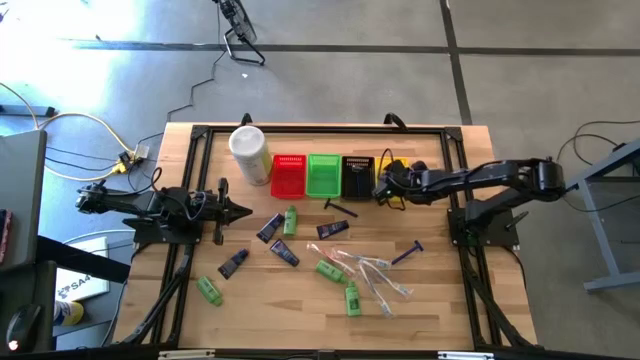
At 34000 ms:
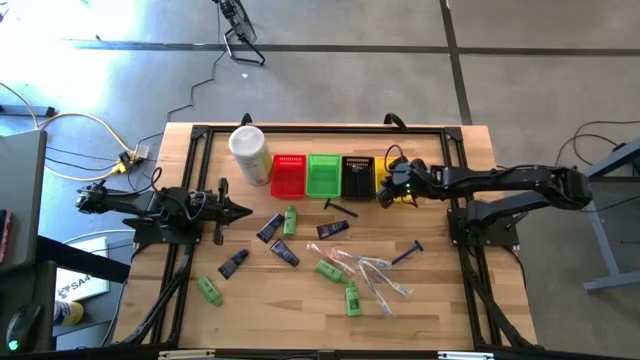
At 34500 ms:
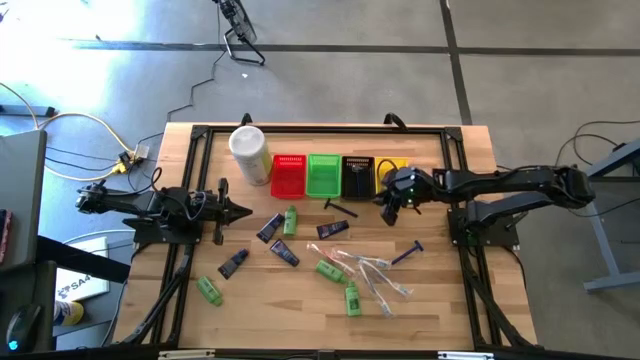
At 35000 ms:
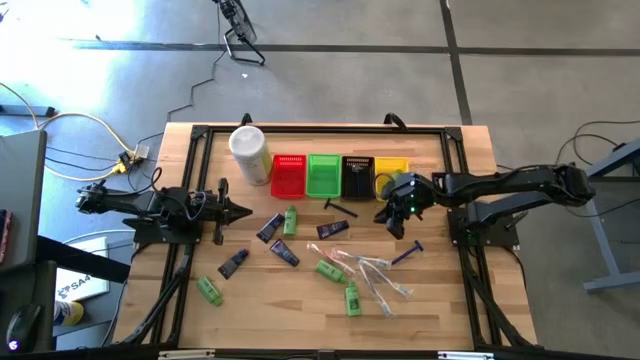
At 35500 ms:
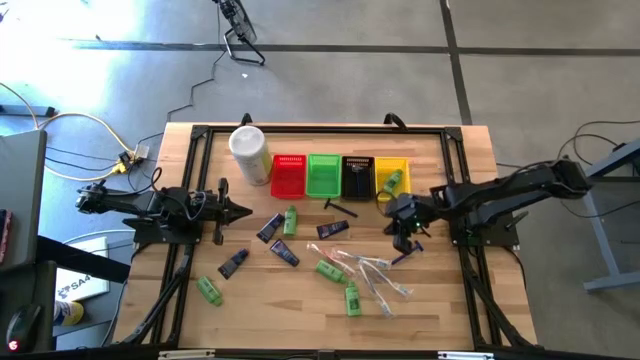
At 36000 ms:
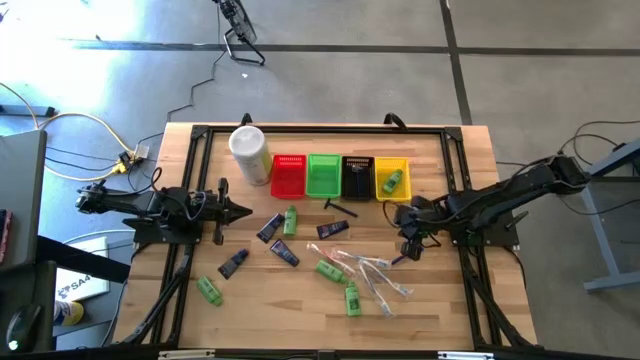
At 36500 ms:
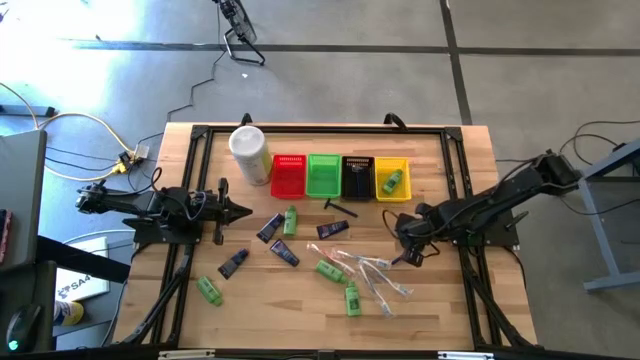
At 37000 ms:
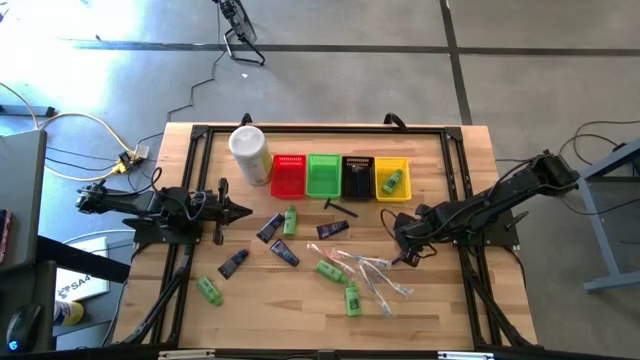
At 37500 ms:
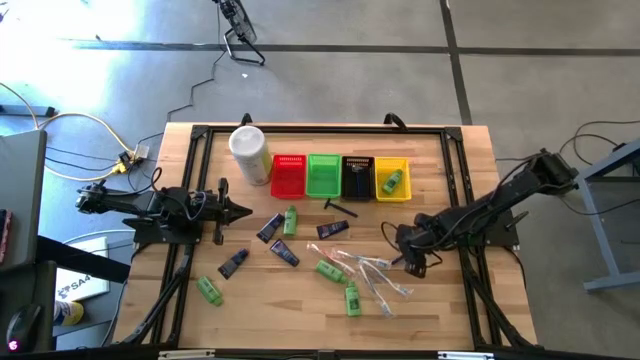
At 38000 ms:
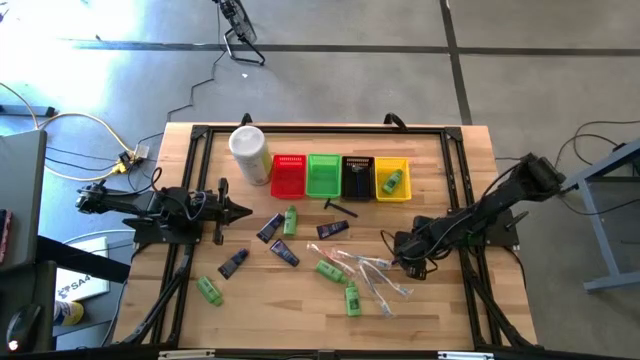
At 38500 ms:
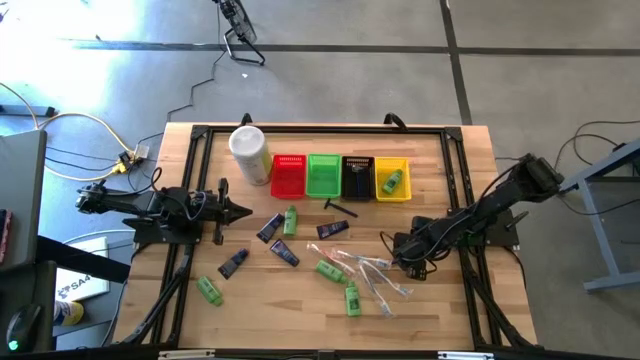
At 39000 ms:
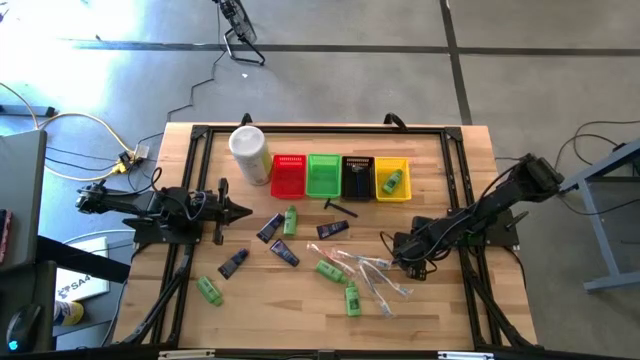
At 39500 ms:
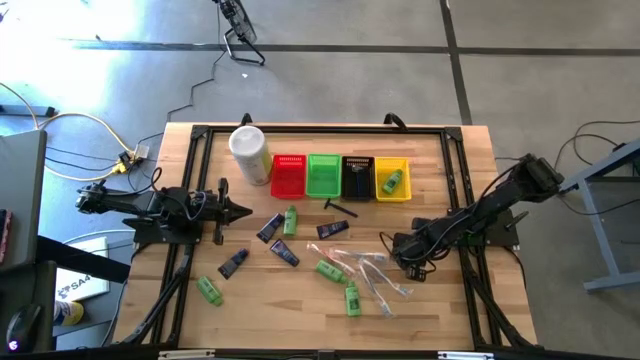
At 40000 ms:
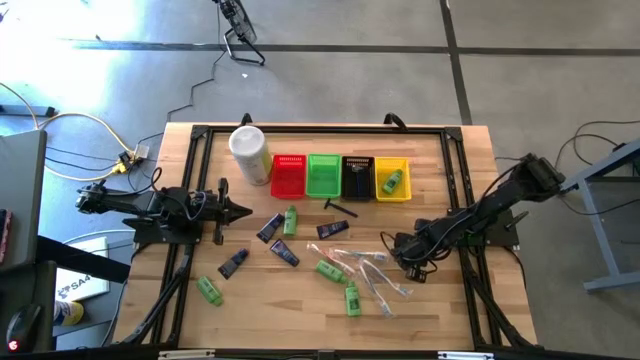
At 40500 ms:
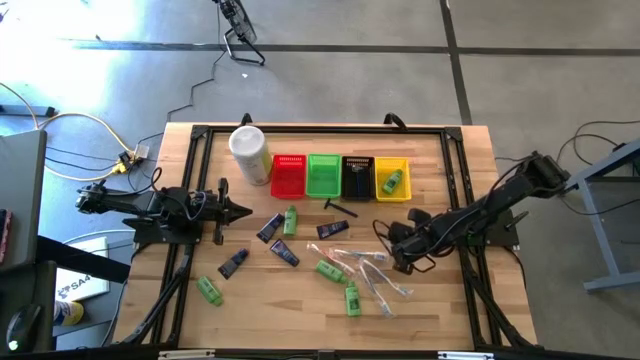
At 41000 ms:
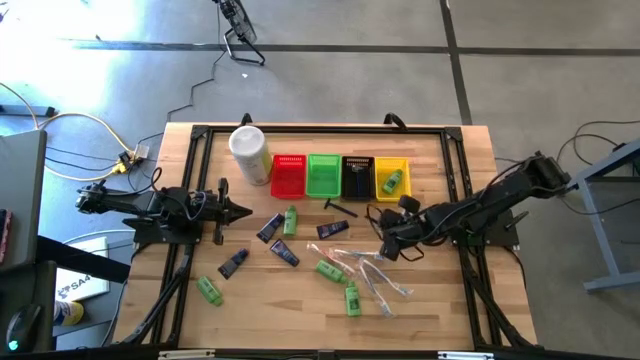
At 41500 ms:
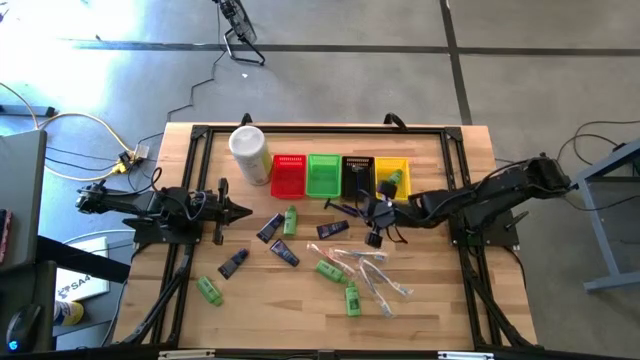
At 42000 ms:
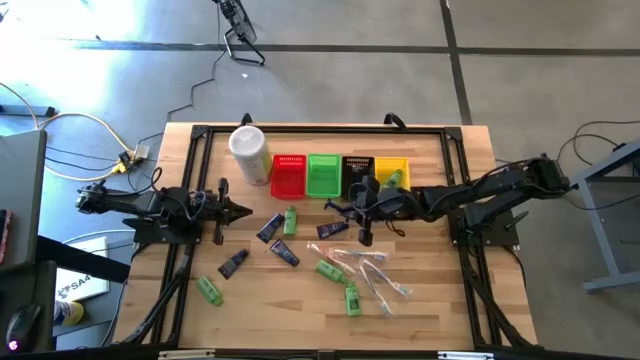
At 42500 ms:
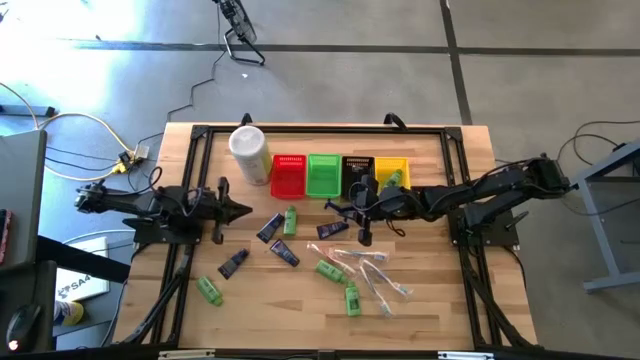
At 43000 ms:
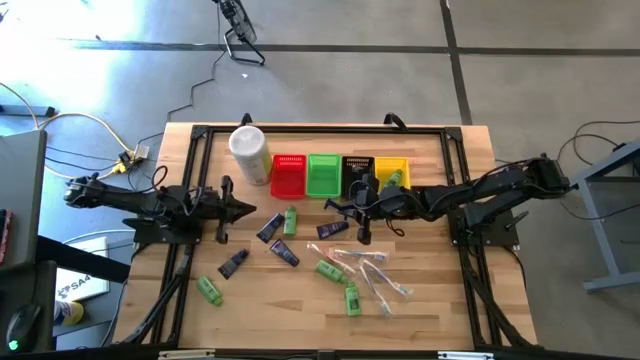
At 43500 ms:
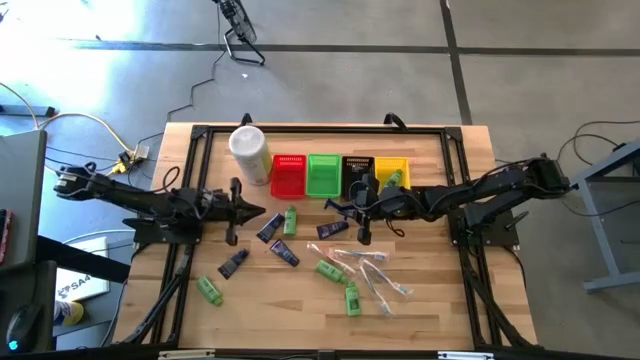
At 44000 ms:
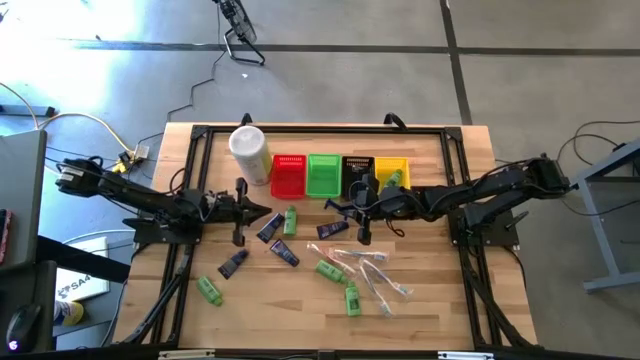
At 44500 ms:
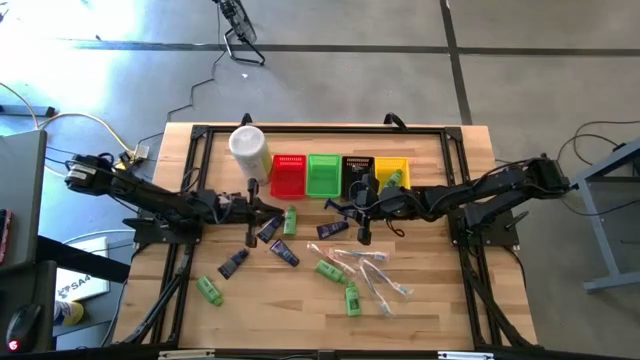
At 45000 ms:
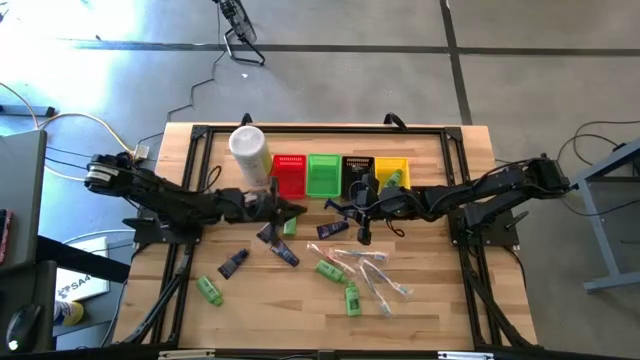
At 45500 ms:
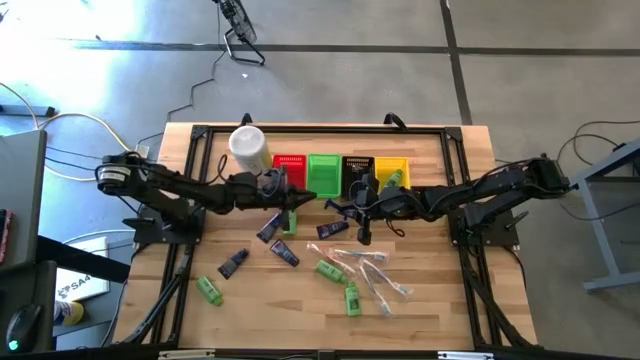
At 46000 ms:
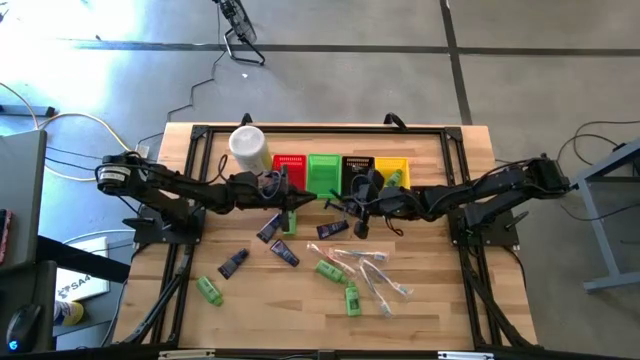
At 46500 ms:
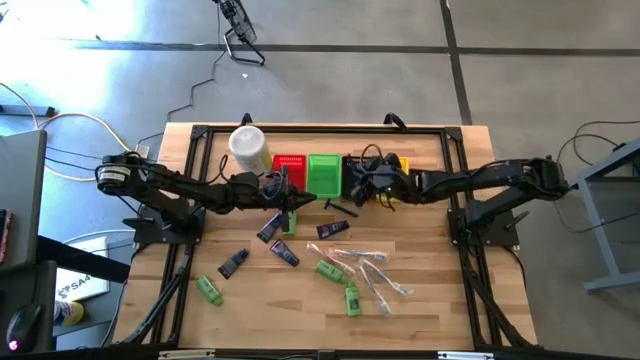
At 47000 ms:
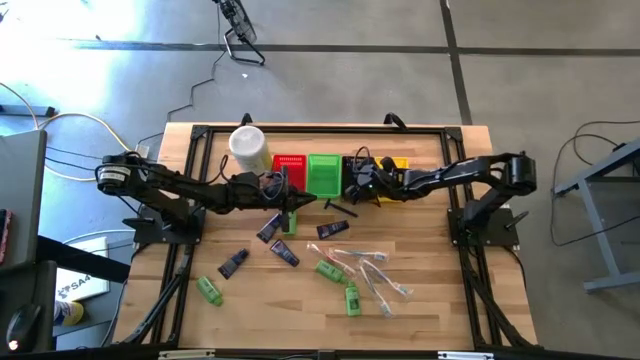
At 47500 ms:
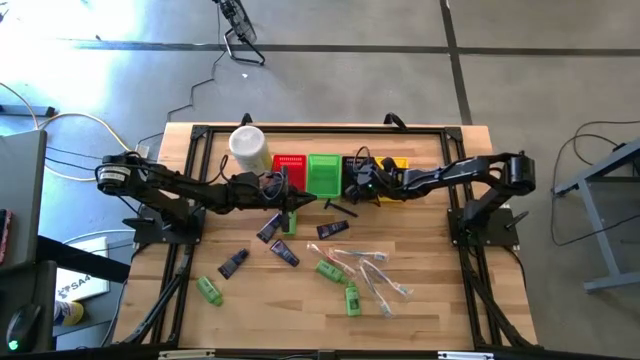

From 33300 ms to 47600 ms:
Task: Pick & Place Travel size toiletries
Put the blue razor into the black bin

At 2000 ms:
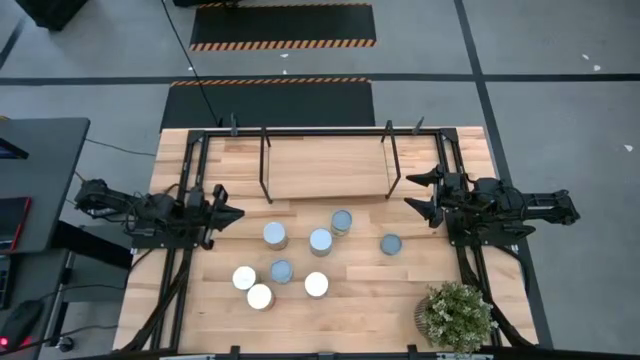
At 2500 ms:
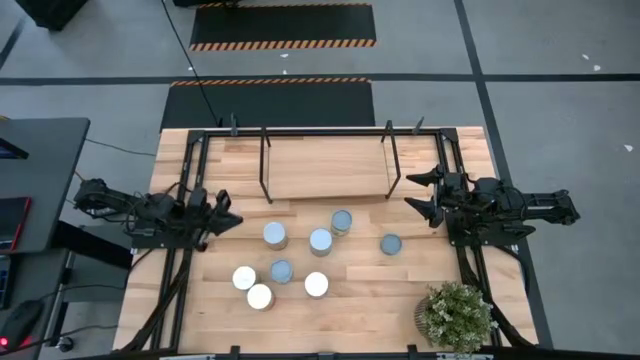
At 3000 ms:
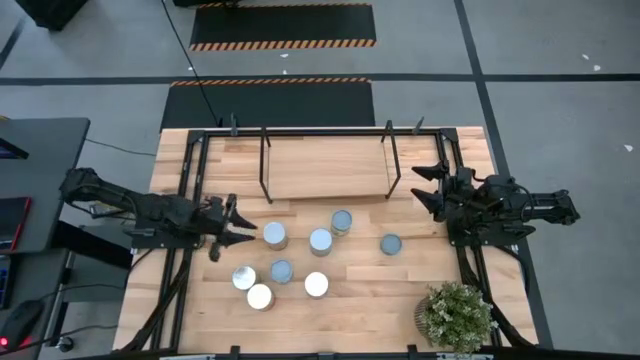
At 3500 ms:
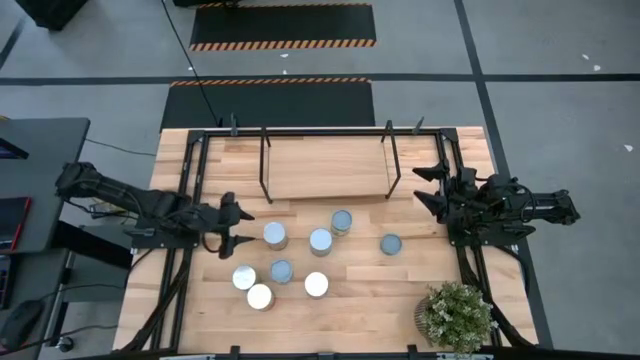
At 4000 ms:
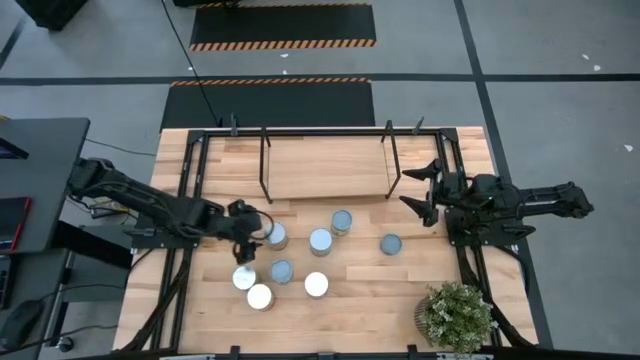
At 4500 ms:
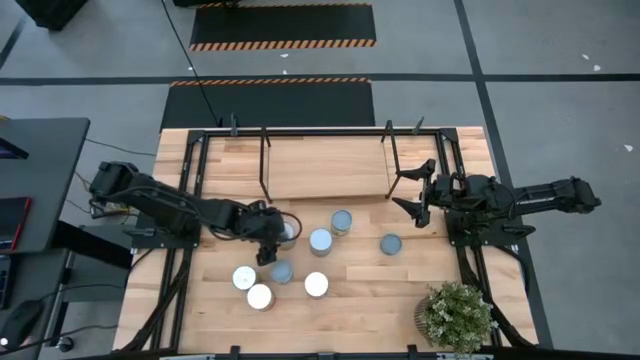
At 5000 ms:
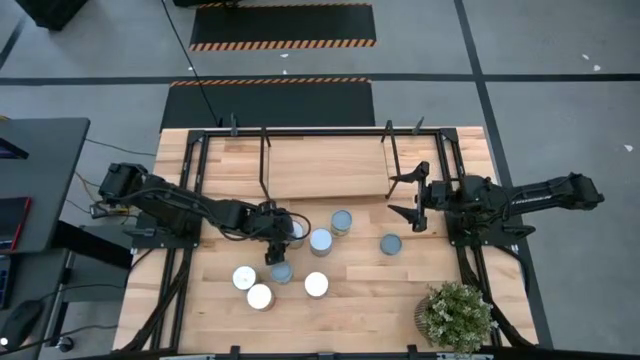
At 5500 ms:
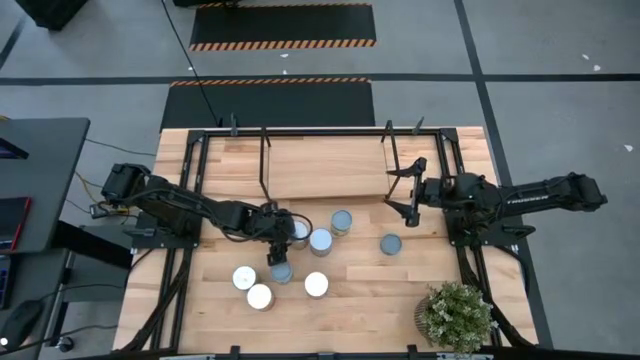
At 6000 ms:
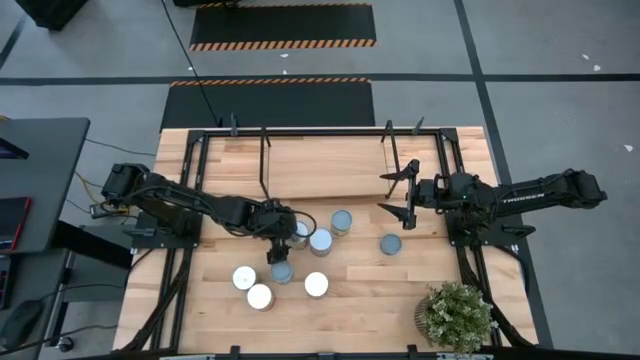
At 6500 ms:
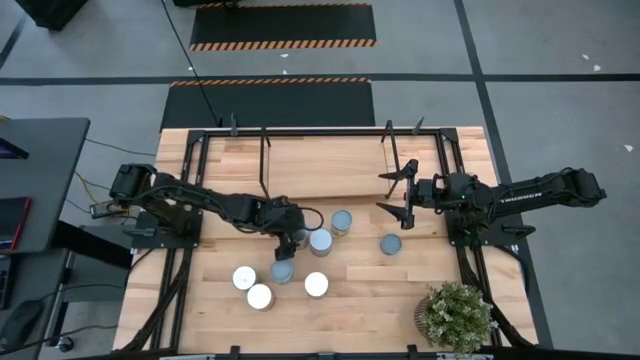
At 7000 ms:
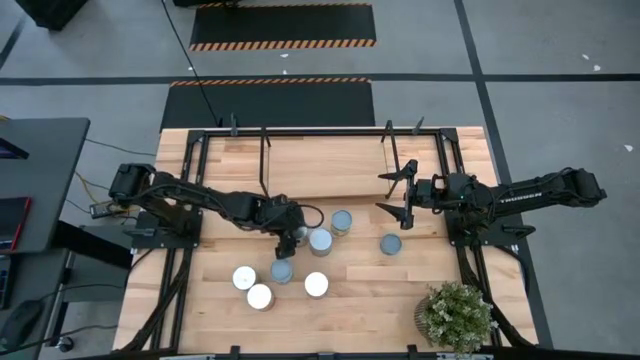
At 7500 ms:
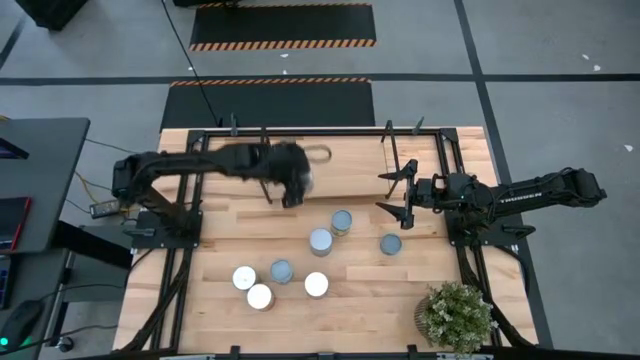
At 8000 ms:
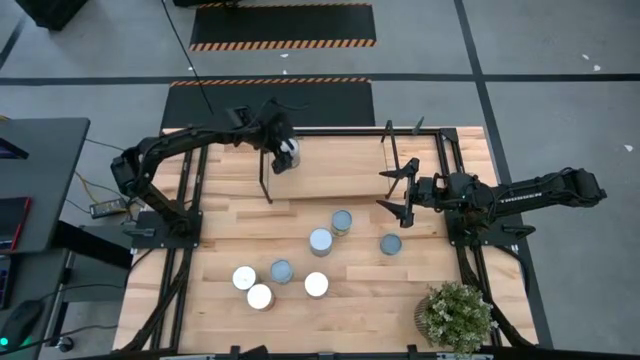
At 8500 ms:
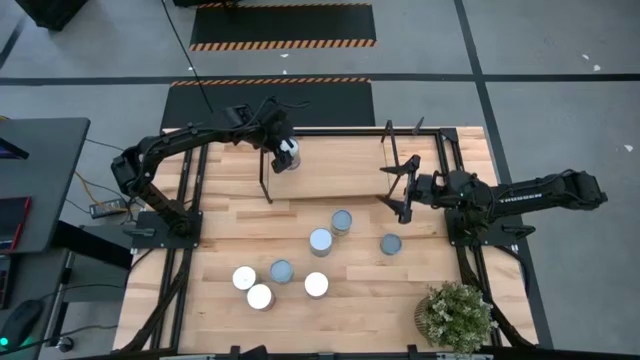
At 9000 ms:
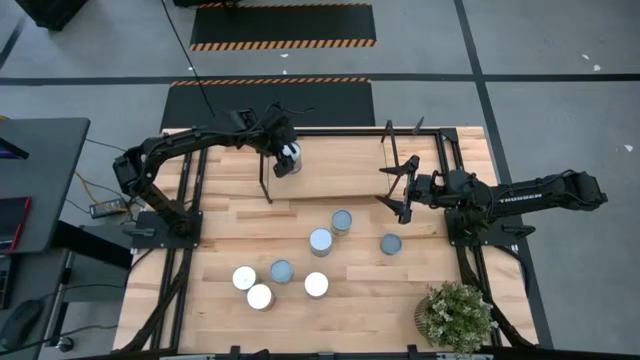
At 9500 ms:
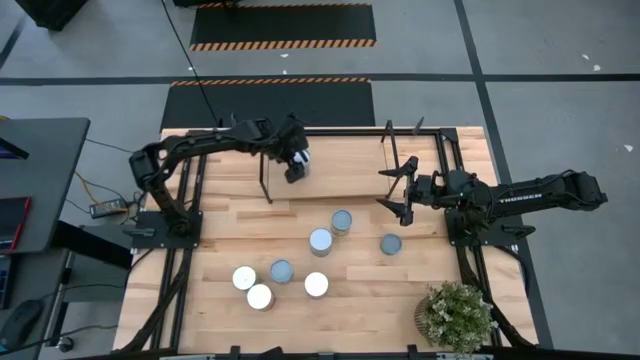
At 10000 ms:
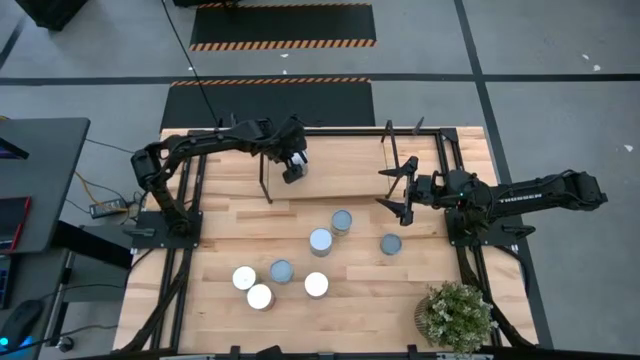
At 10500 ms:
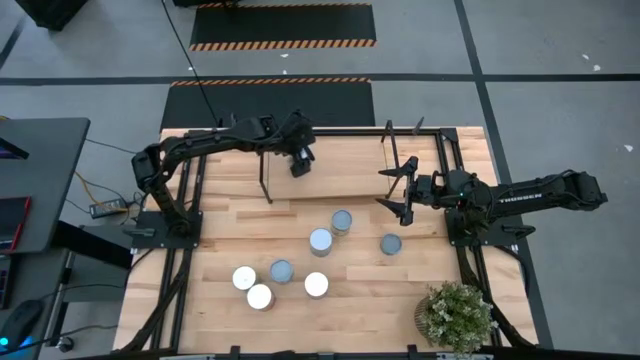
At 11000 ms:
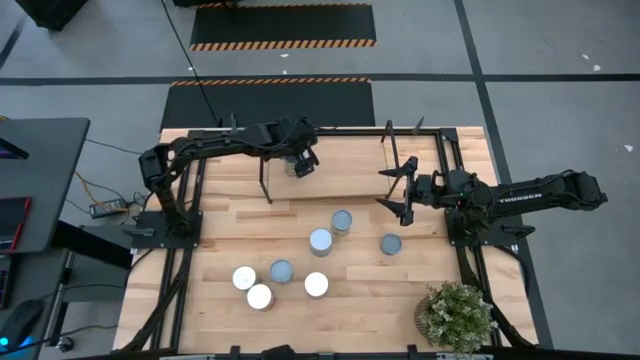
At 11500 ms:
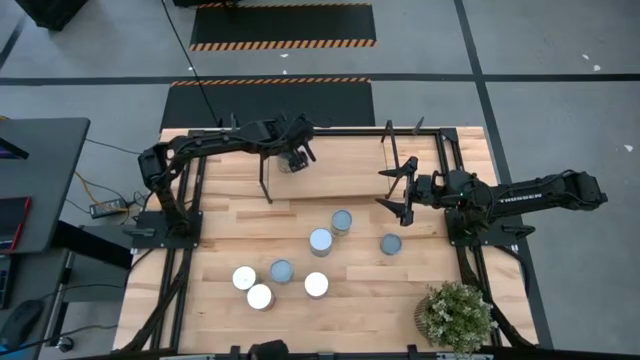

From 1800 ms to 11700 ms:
Task: Pick and place cans onto a shelf
Put the canned peaches on the shelf
